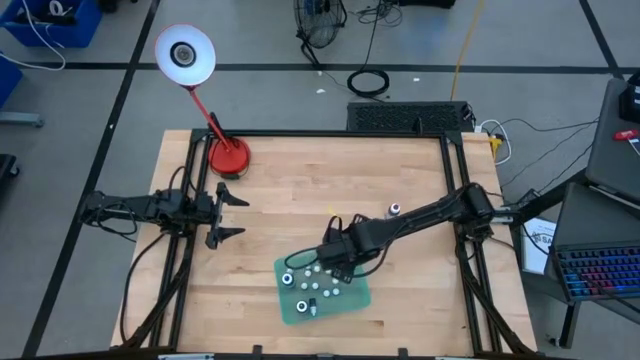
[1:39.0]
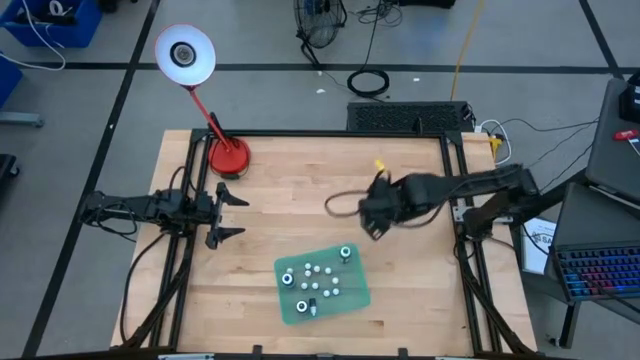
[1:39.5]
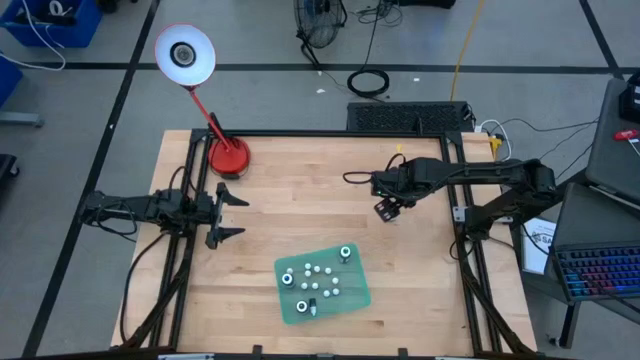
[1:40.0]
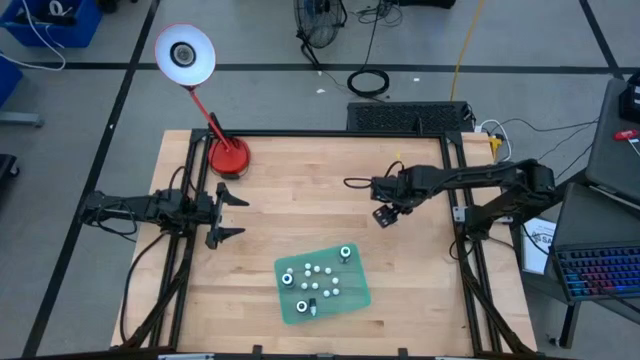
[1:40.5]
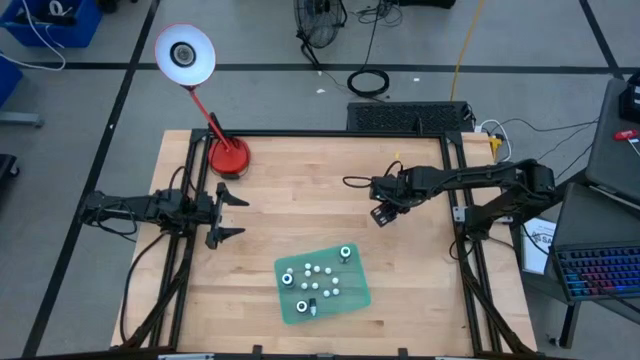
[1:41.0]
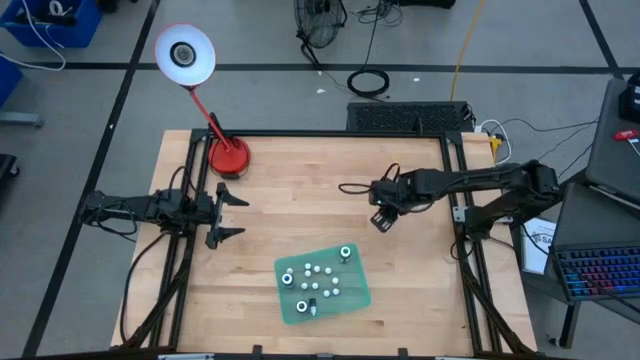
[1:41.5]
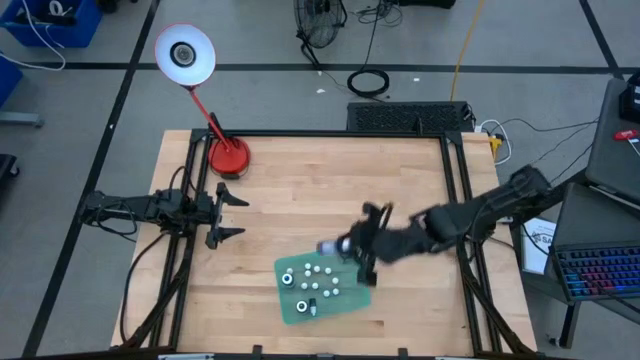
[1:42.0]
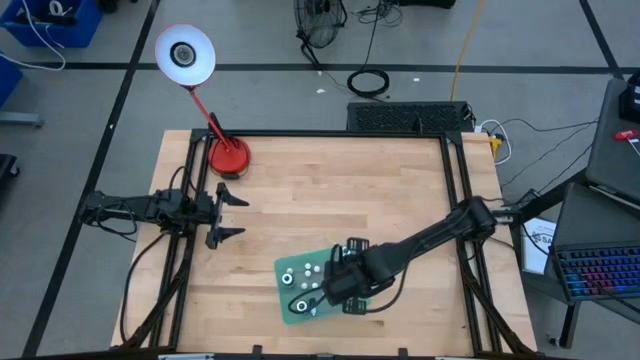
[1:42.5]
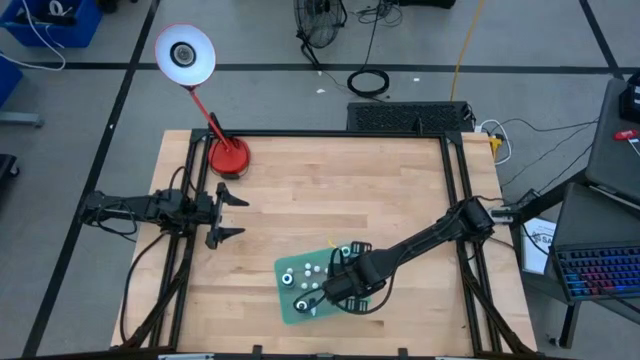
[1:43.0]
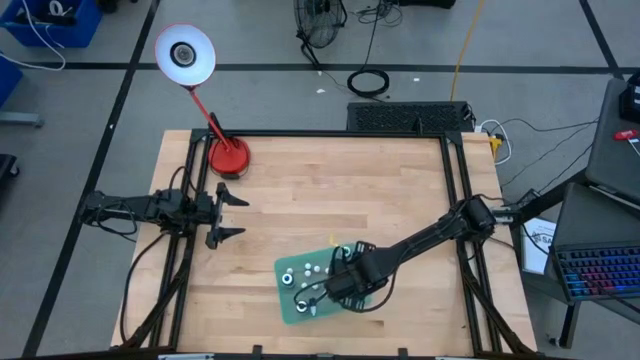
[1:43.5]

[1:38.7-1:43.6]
Task: Pick & Place food coloring
Put the large purple food coloring bottle into the blue bin

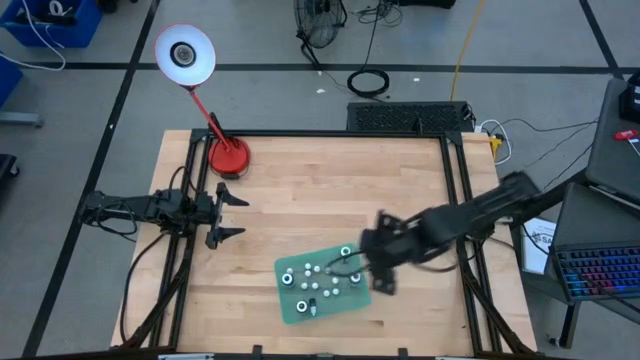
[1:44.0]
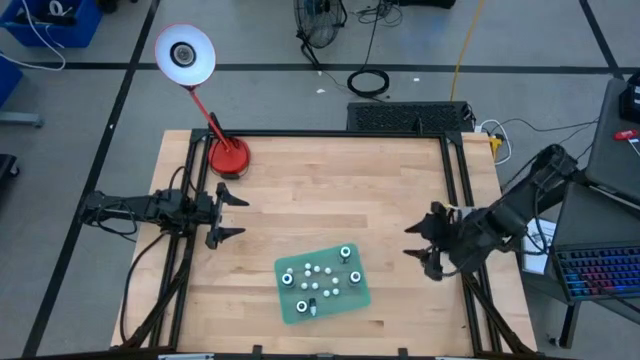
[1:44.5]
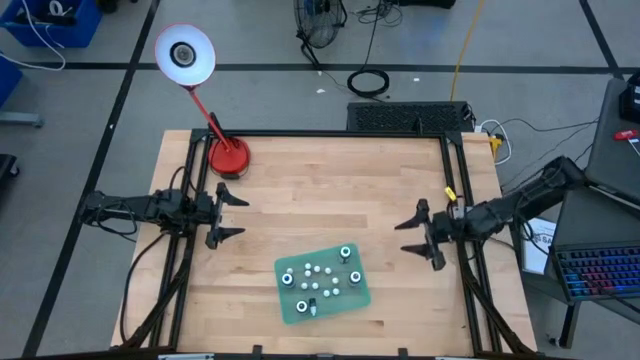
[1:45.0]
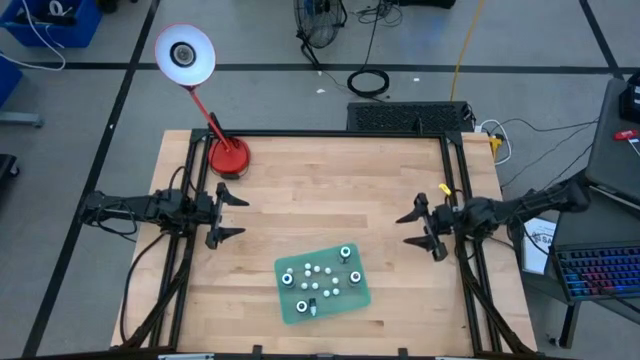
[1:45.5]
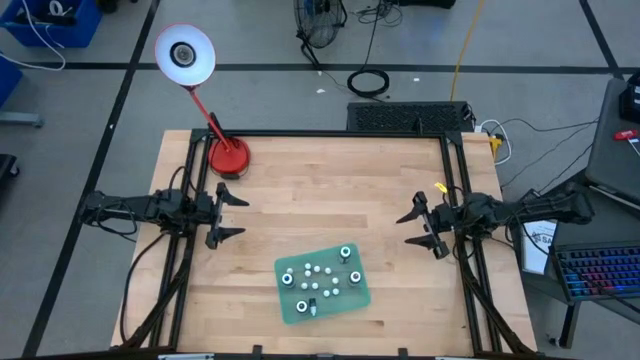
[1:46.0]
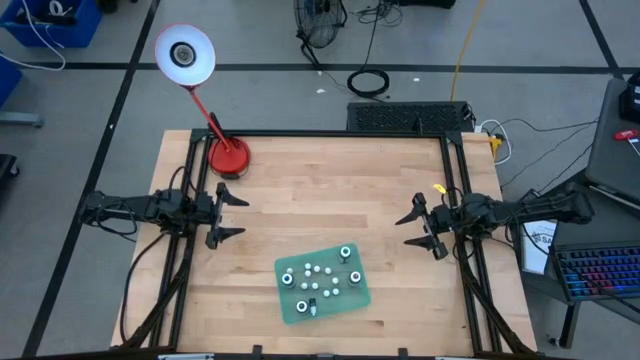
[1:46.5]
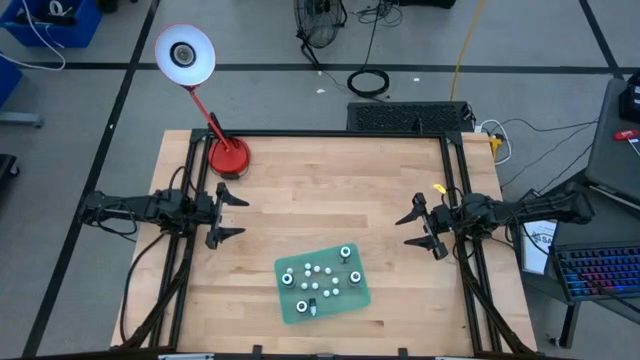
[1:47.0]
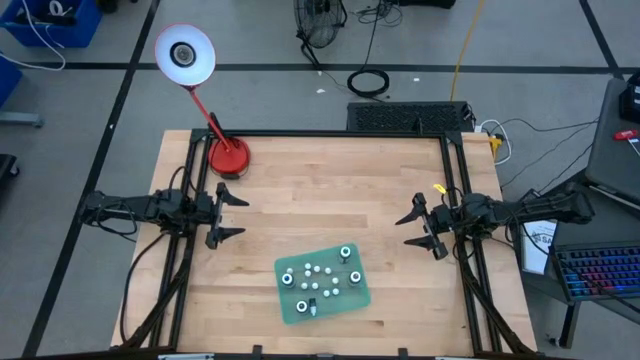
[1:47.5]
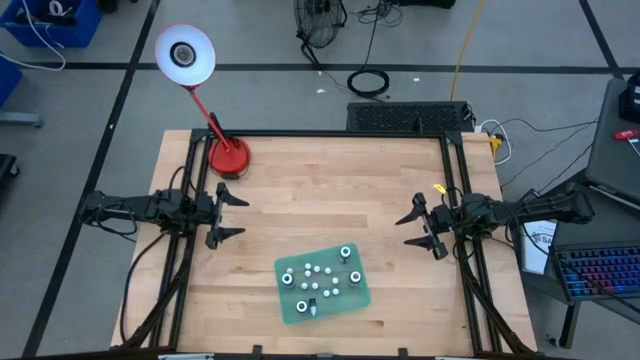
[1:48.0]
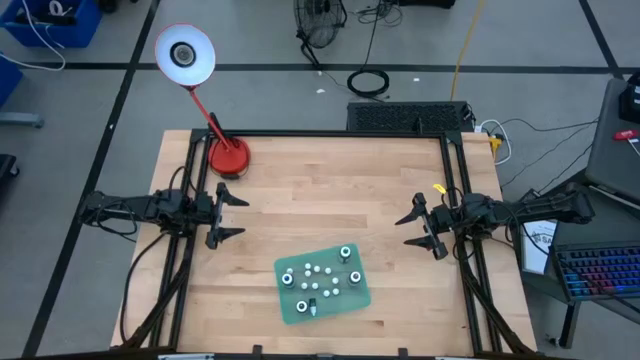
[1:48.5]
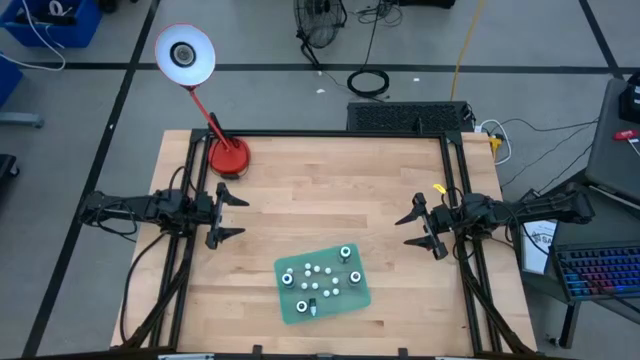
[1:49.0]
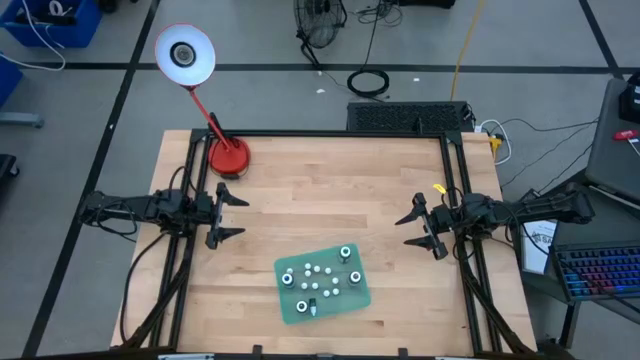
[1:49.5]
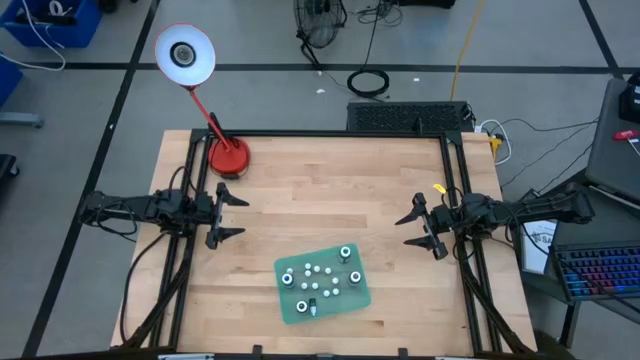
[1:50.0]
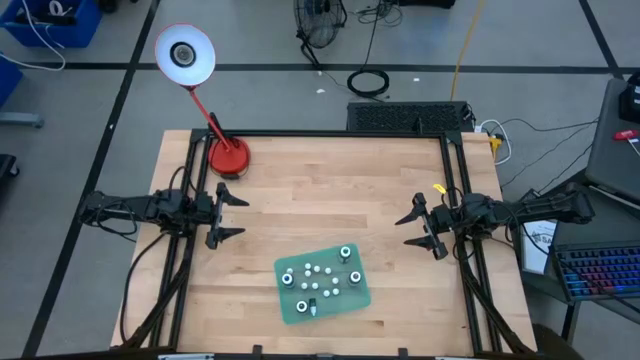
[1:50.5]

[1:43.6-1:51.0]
Return to Home Position

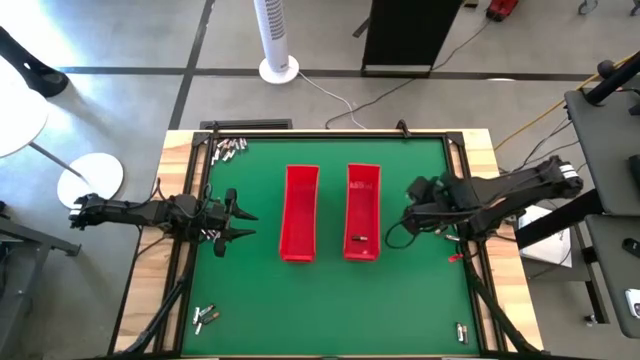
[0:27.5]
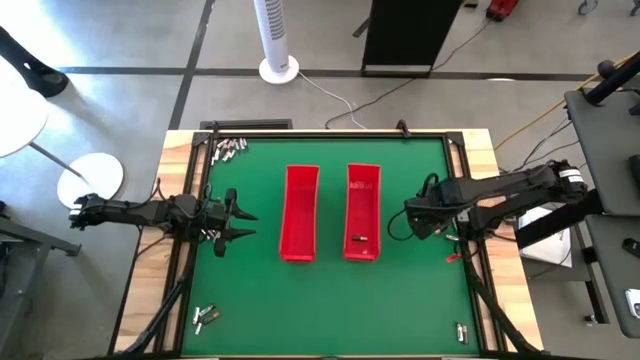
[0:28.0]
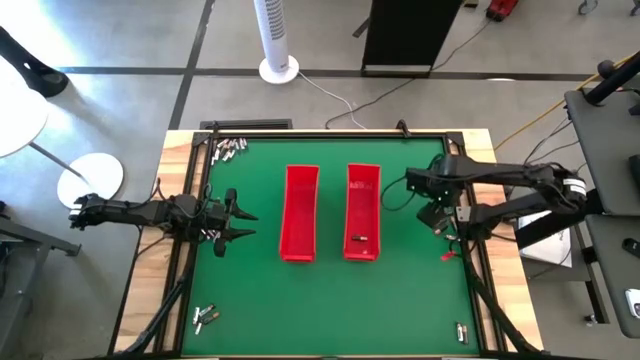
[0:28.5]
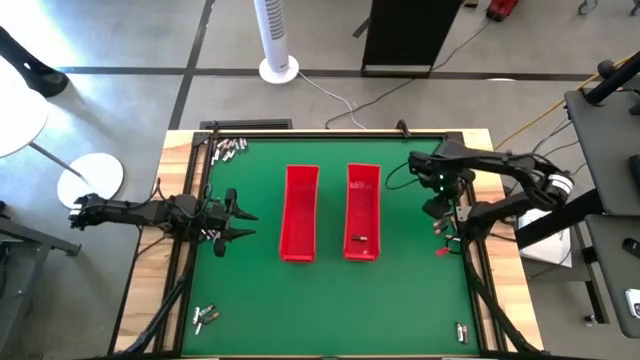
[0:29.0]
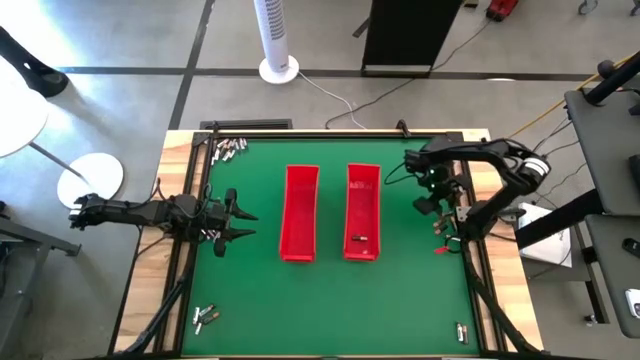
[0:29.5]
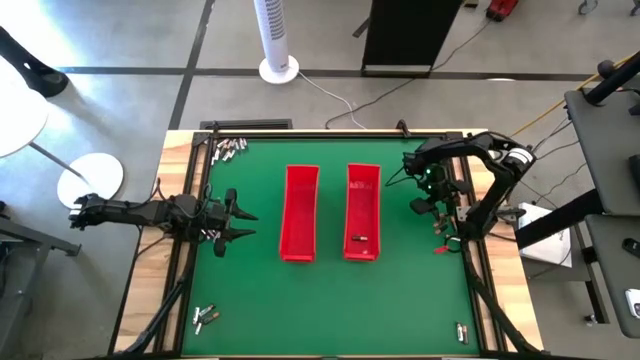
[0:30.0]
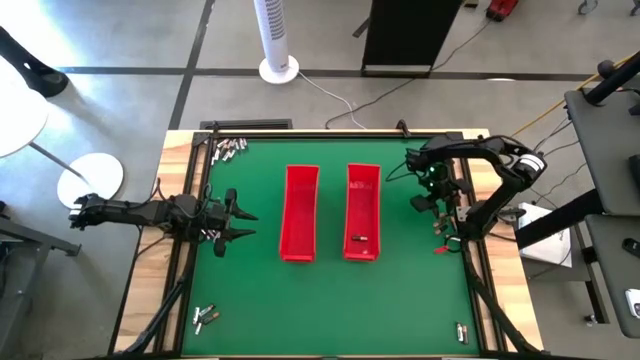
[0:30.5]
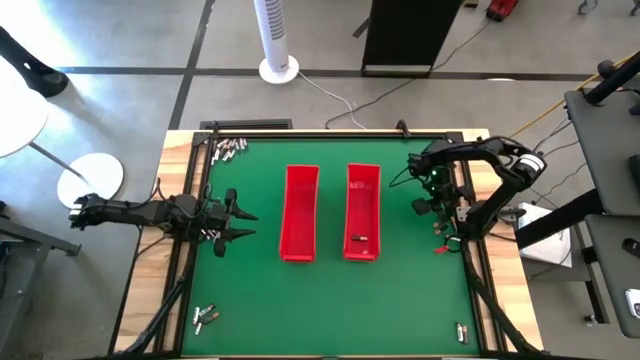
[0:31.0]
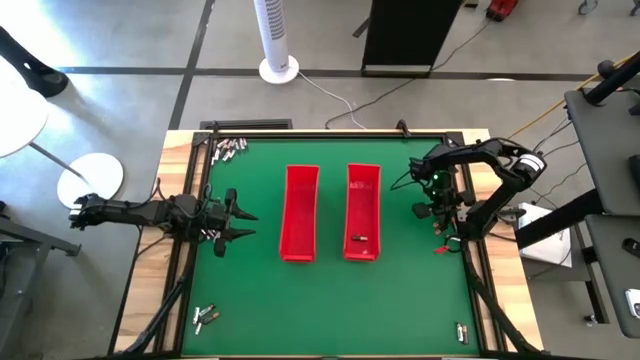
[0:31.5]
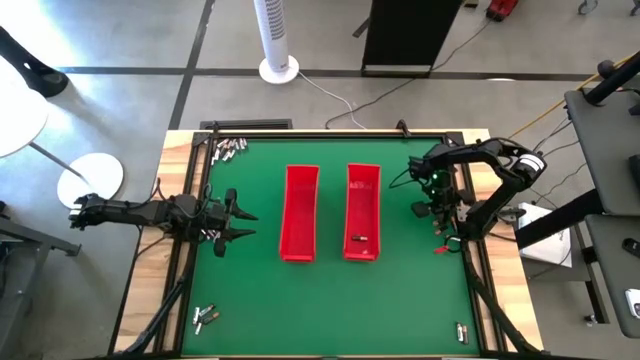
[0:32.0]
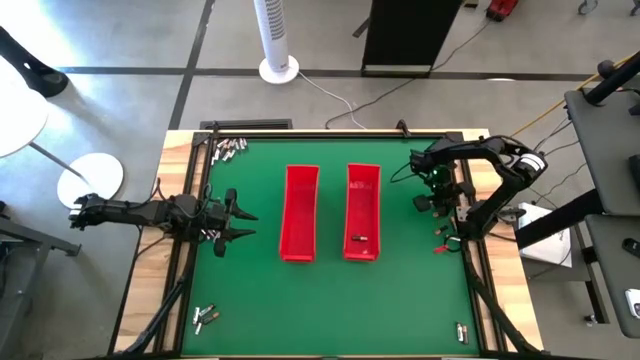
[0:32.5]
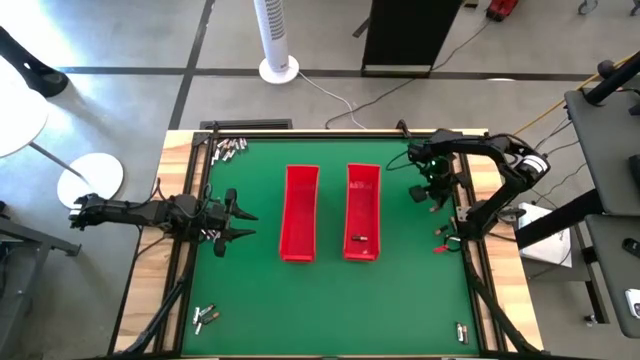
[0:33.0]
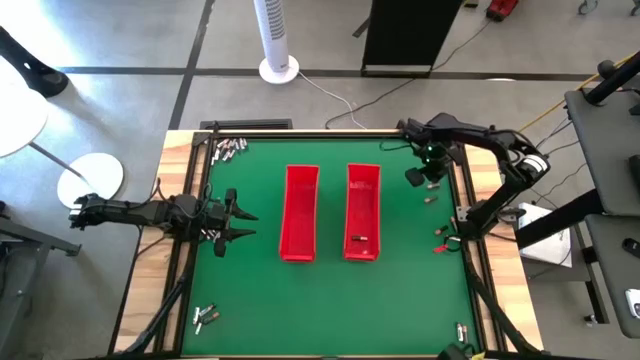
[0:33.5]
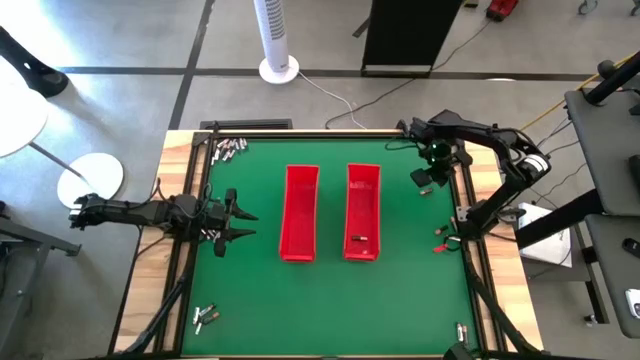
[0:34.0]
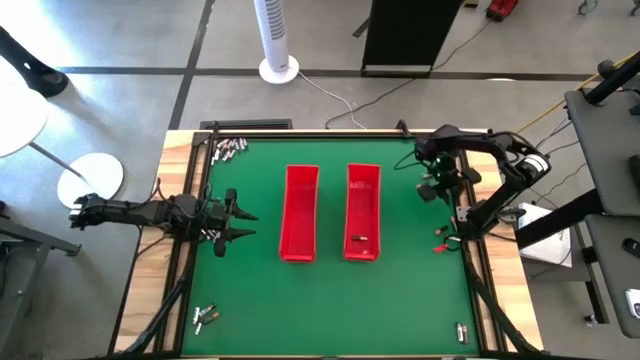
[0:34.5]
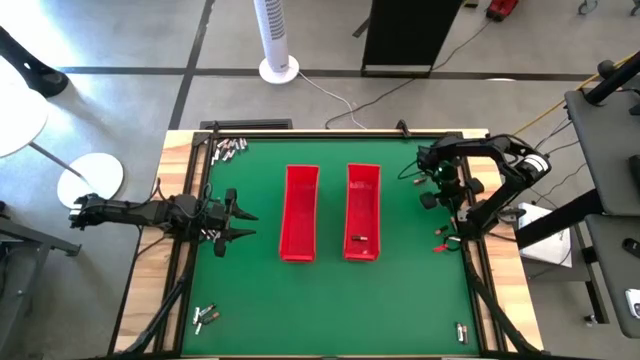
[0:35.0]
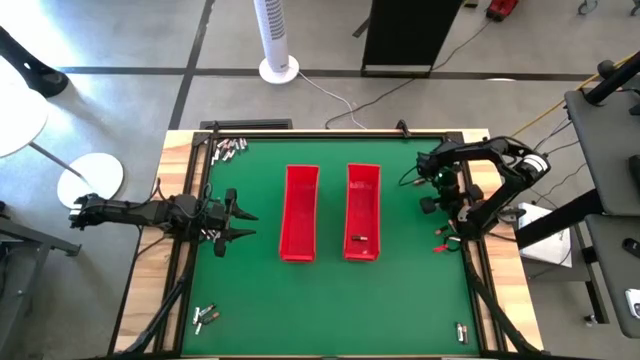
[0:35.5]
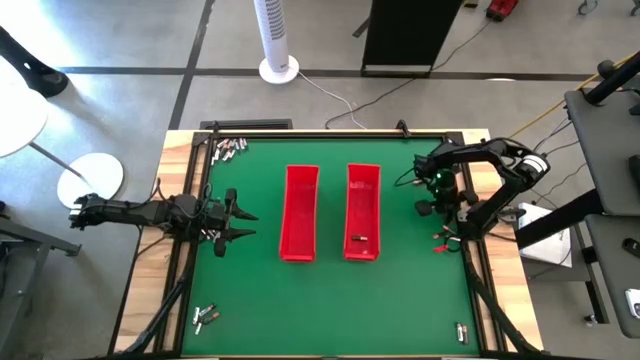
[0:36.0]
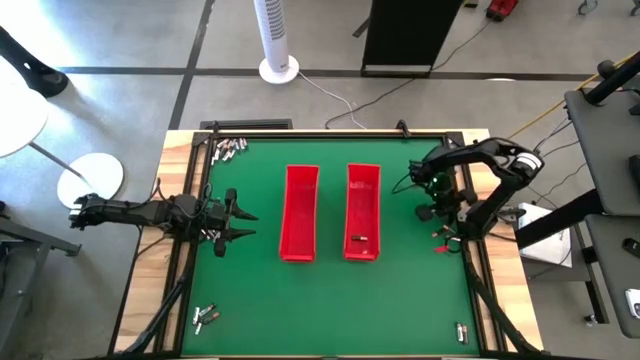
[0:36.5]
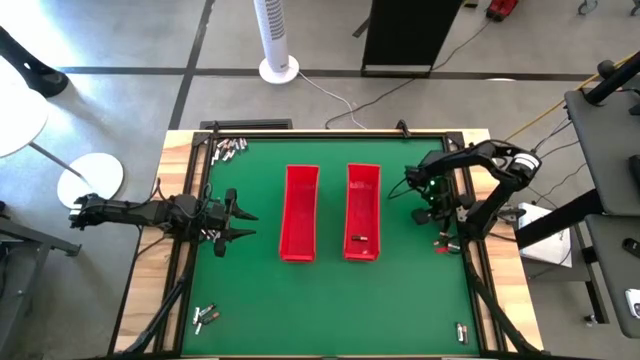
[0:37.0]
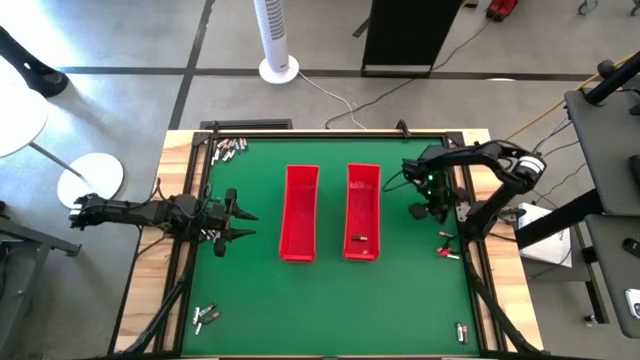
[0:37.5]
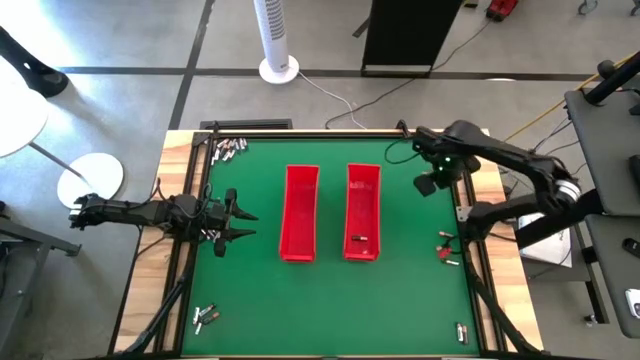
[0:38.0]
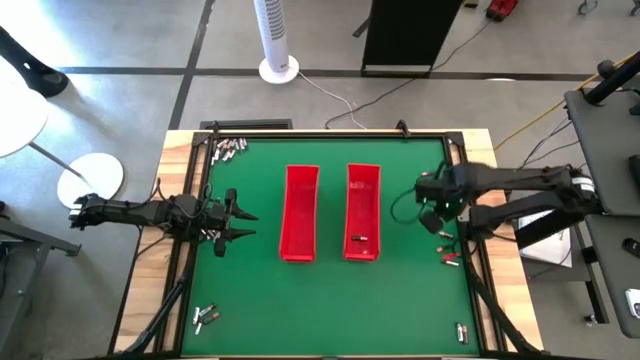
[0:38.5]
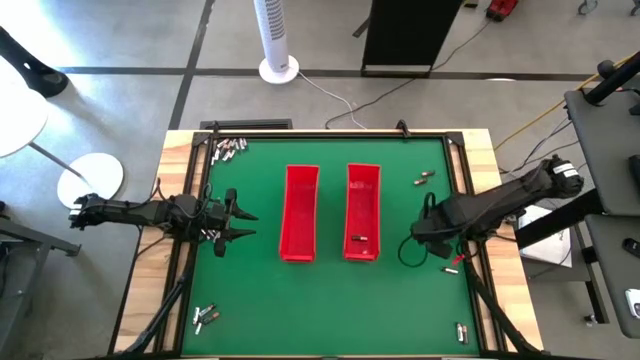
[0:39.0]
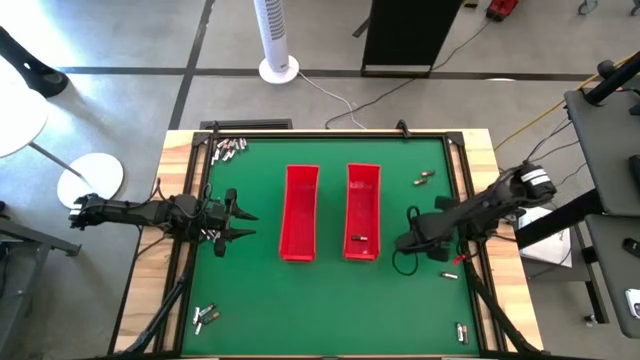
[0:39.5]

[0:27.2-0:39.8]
Task: Sort batteries
Put the black battery into the right red bin
